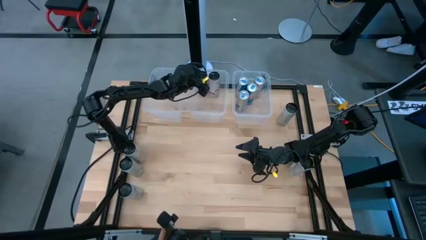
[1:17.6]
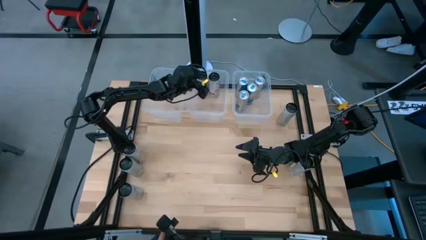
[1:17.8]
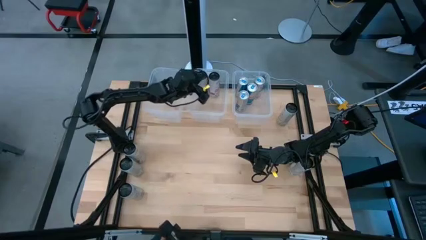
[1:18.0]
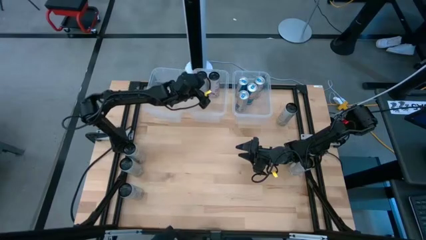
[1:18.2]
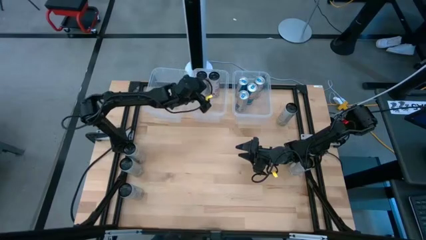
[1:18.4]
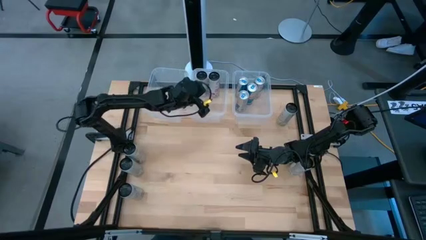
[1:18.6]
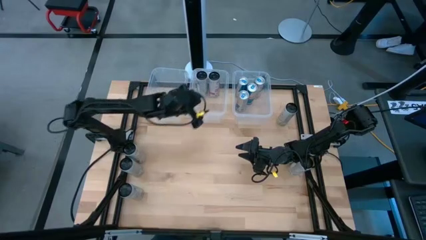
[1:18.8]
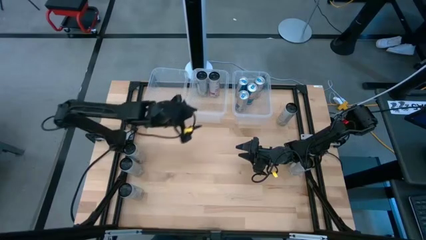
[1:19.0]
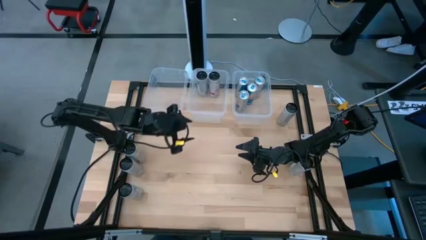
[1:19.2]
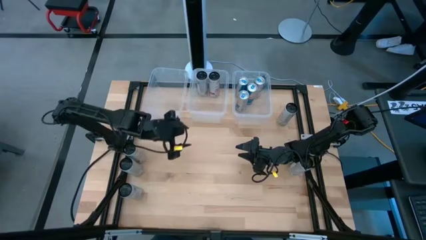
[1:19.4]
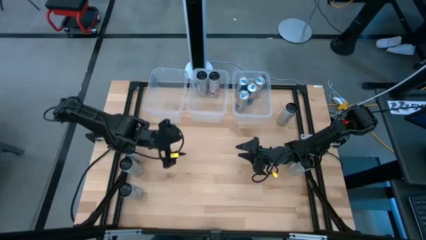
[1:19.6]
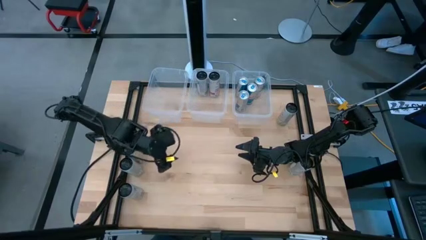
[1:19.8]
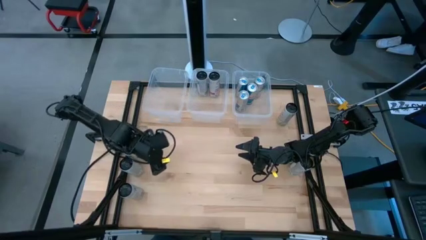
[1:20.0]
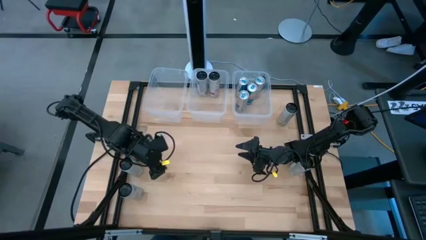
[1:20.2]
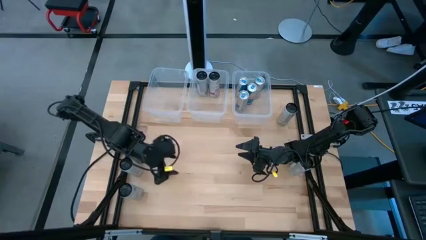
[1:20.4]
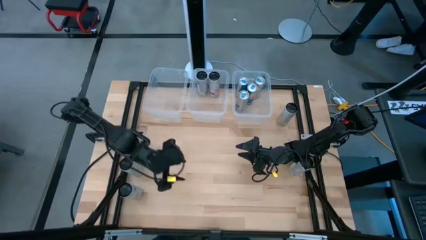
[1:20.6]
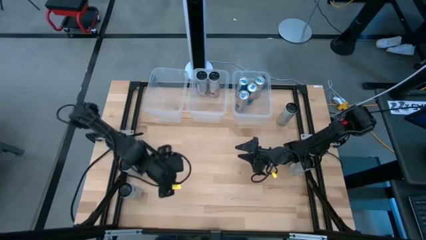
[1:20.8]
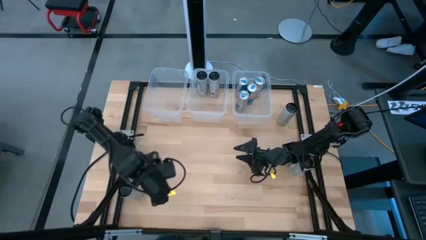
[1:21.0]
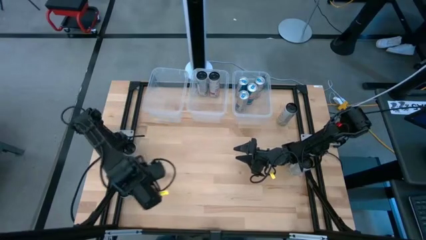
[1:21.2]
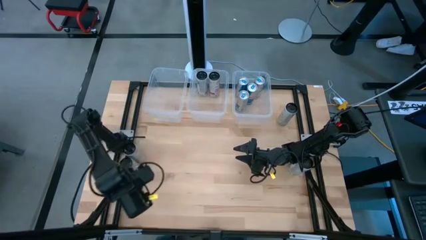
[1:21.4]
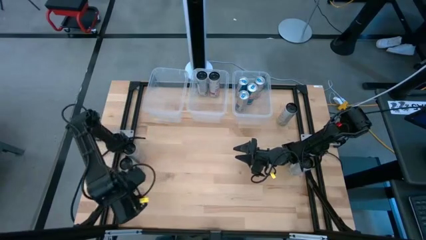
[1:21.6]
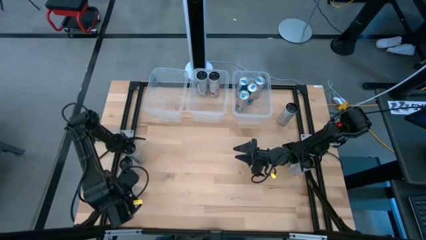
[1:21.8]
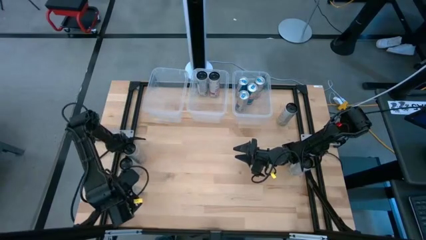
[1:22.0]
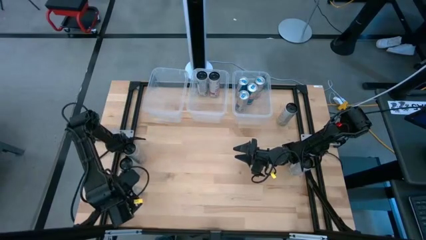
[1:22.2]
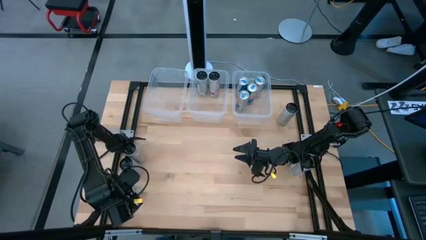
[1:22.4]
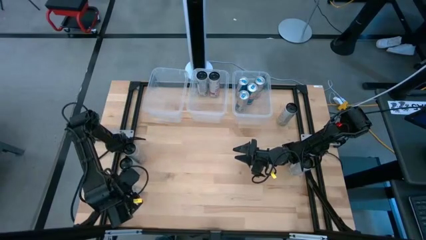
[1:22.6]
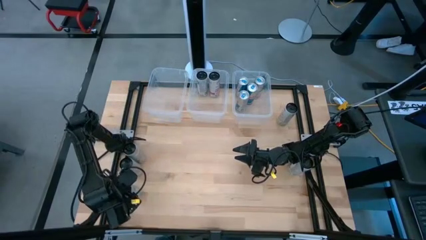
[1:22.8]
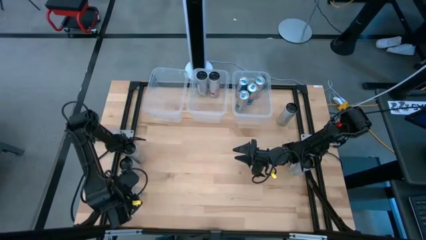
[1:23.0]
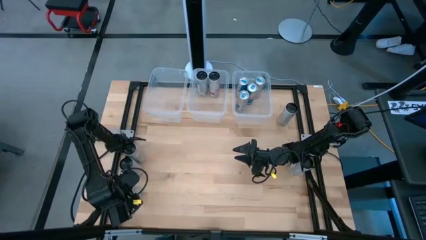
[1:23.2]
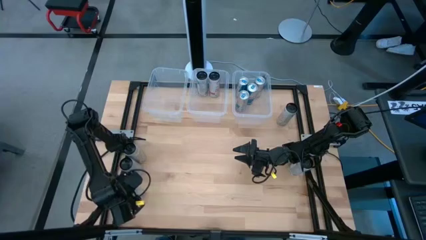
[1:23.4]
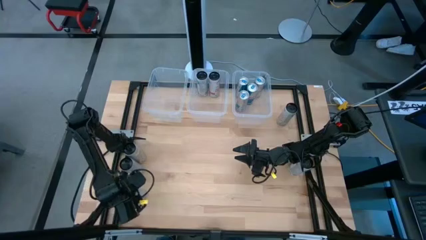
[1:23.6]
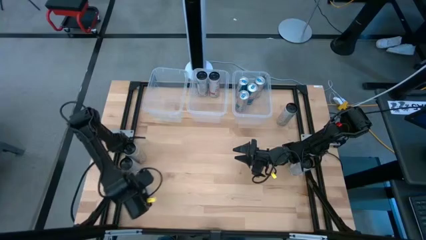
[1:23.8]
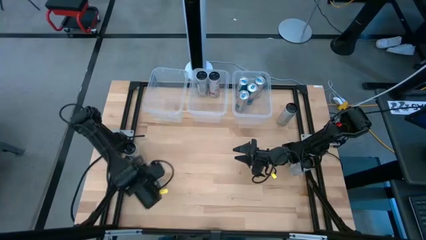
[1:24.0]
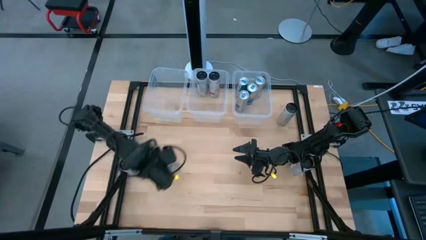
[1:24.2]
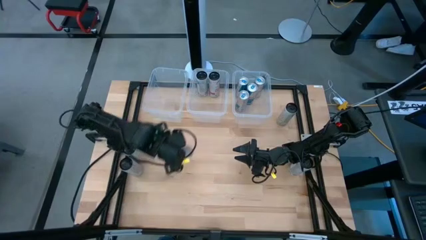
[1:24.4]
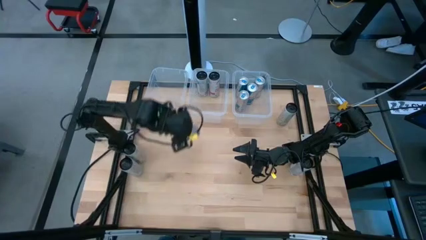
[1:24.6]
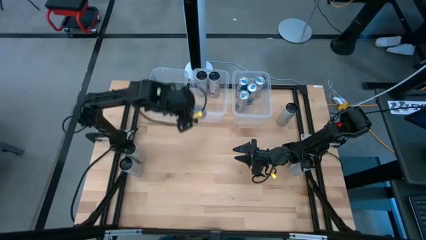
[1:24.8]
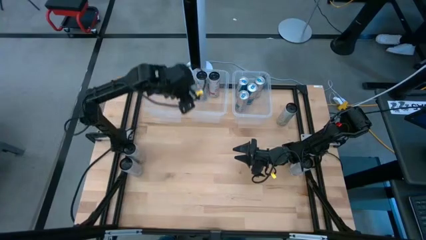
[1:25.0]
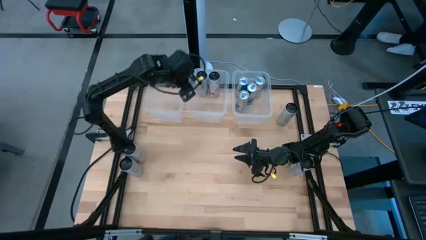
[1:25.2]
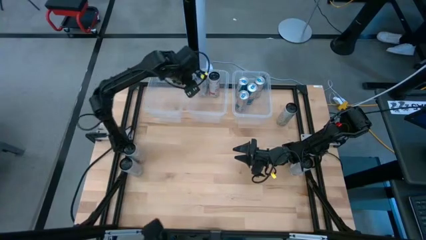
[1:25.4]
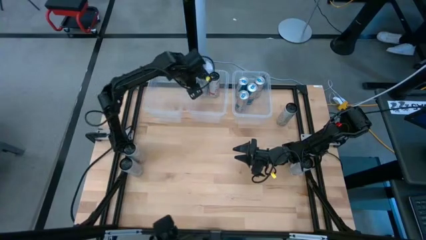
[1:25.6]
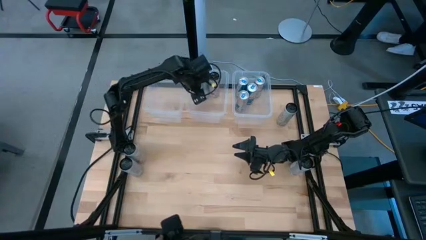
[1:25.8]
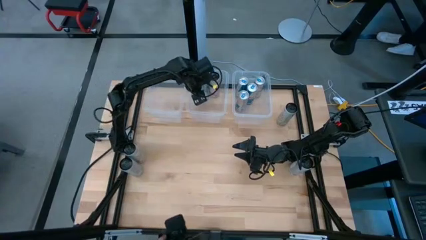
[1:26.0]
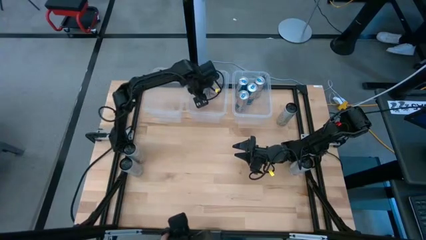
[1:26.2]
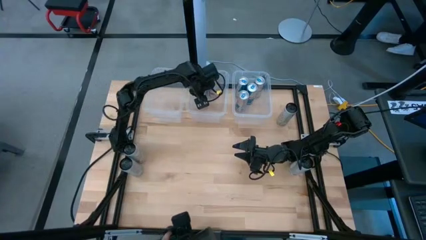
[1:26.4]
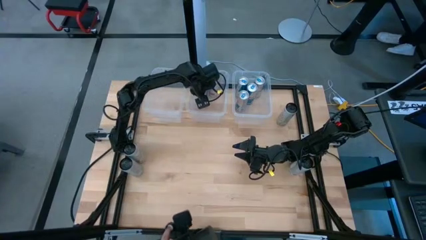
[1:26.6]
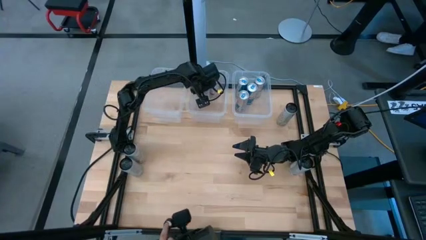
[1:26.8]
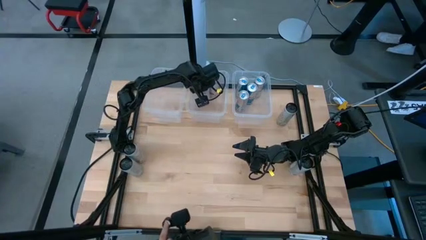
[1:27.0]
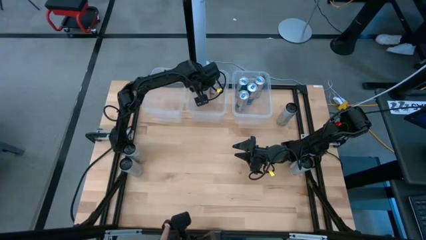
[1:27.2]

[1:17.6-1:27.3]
Task: Sort soda cans
Put the white-pink soda can into the middle transparent bin

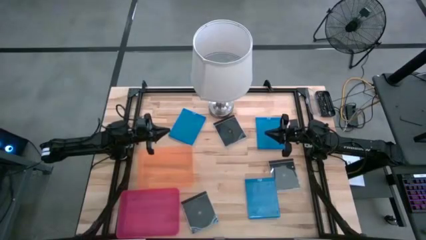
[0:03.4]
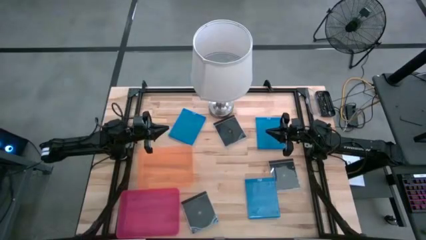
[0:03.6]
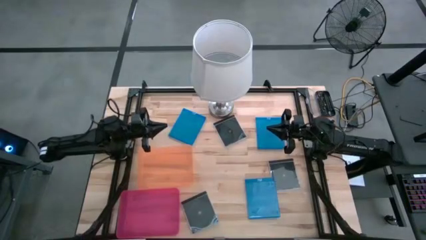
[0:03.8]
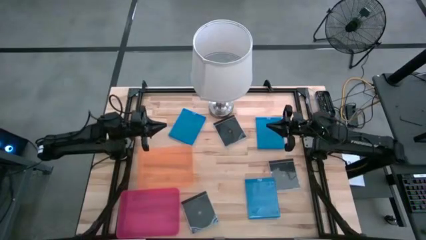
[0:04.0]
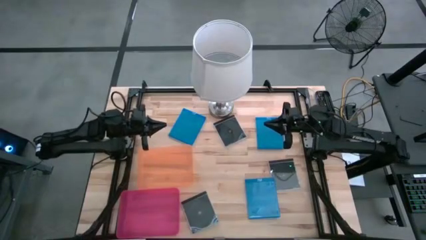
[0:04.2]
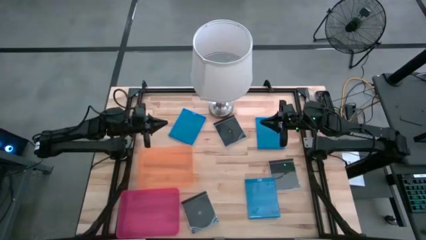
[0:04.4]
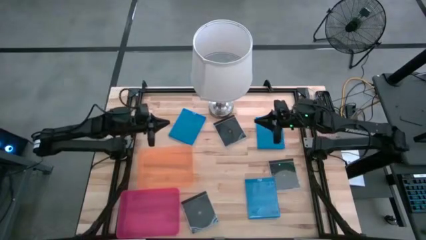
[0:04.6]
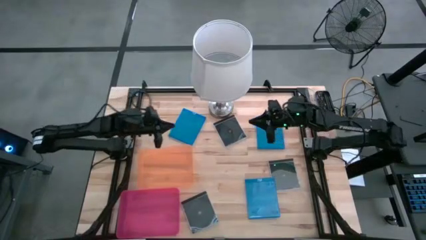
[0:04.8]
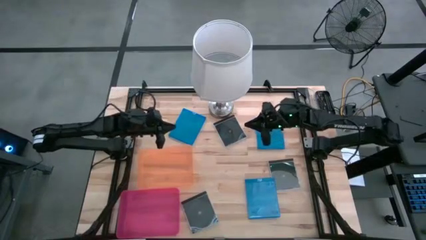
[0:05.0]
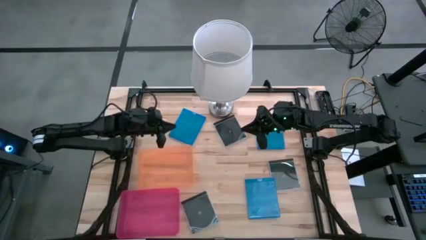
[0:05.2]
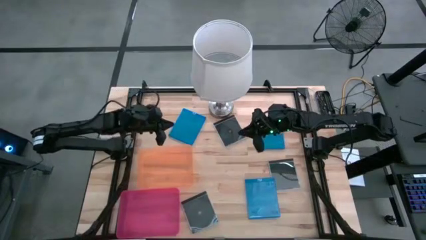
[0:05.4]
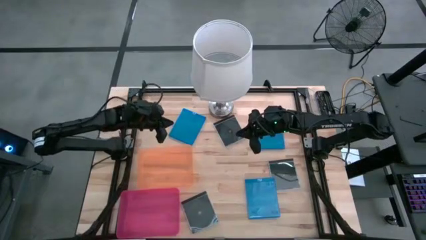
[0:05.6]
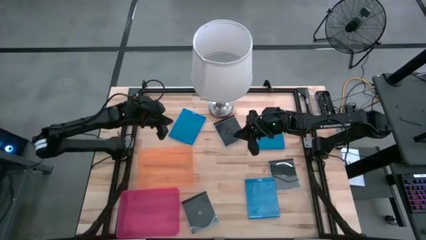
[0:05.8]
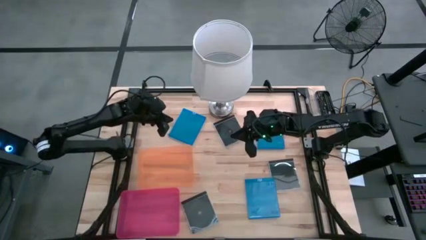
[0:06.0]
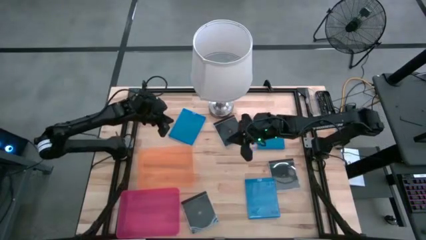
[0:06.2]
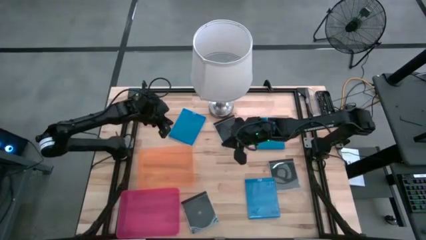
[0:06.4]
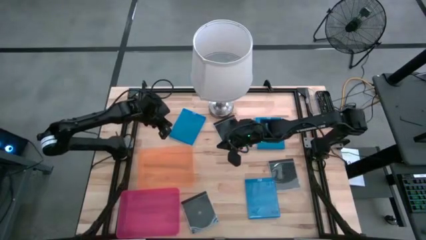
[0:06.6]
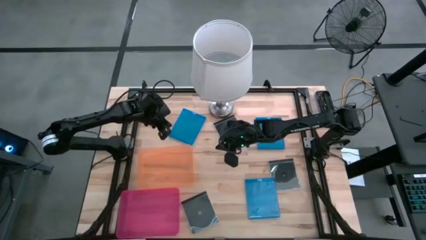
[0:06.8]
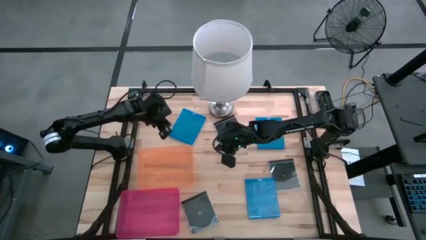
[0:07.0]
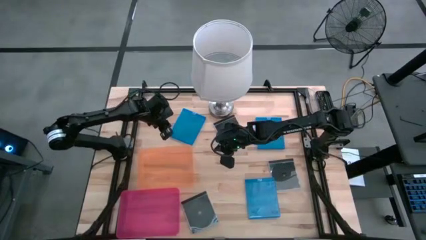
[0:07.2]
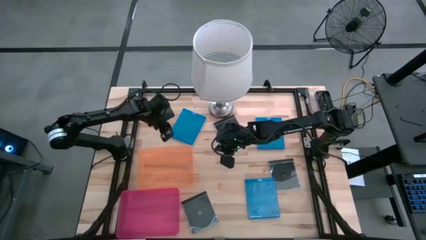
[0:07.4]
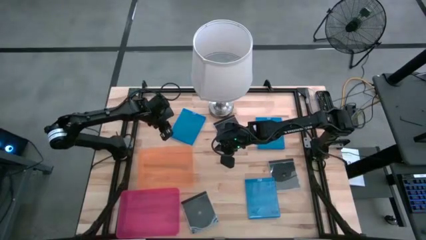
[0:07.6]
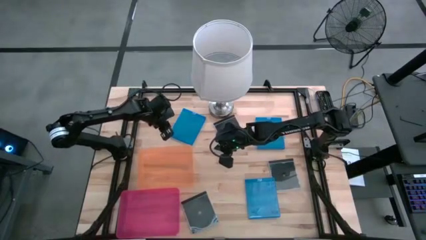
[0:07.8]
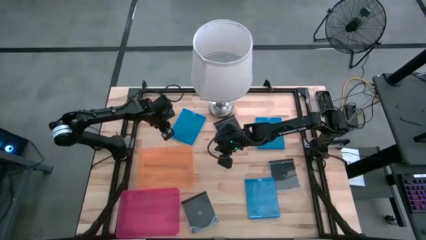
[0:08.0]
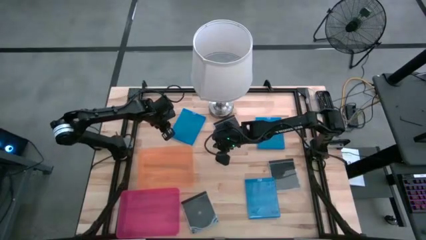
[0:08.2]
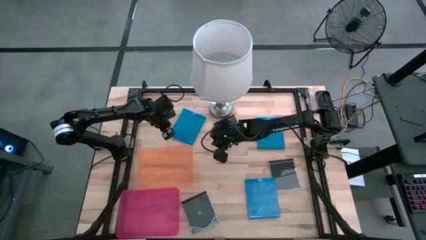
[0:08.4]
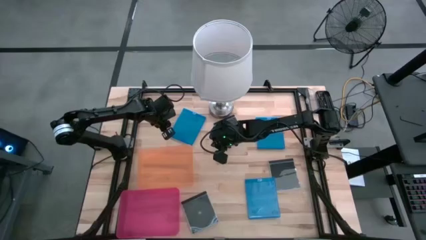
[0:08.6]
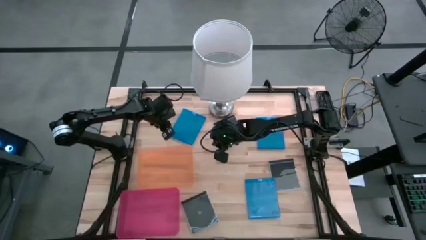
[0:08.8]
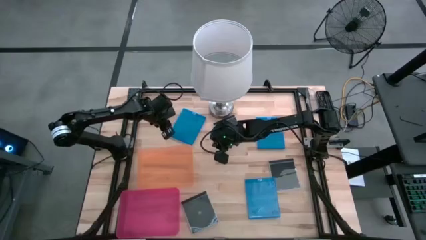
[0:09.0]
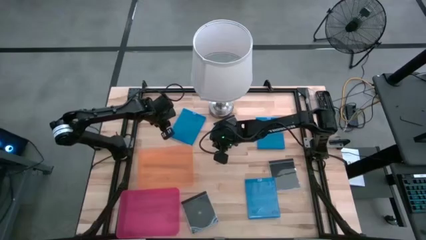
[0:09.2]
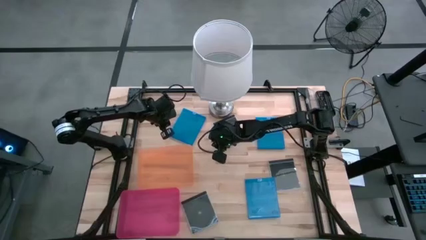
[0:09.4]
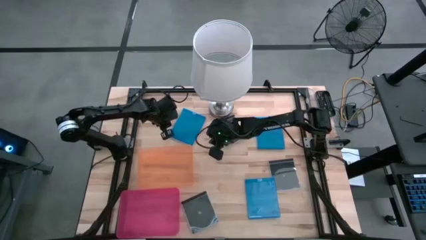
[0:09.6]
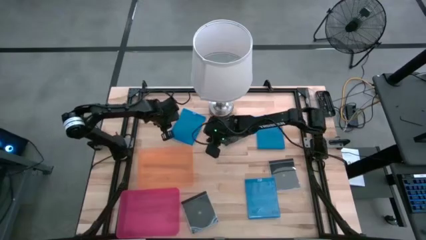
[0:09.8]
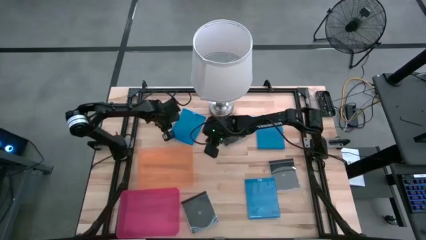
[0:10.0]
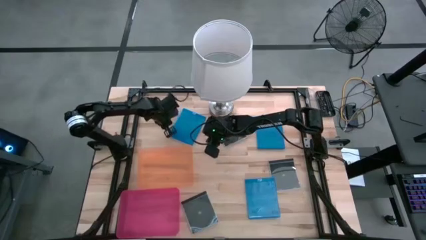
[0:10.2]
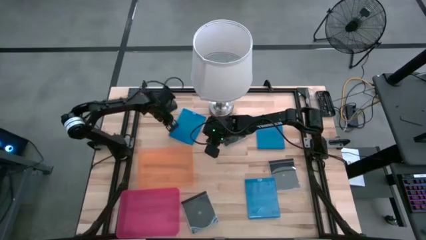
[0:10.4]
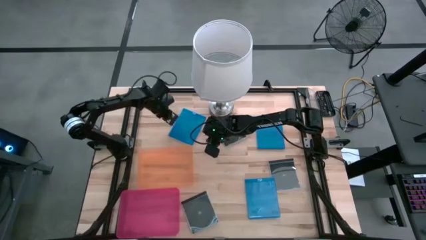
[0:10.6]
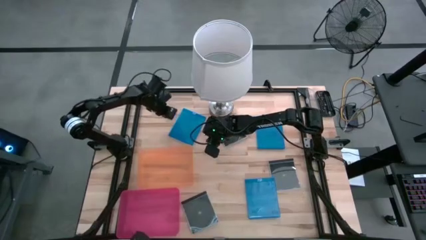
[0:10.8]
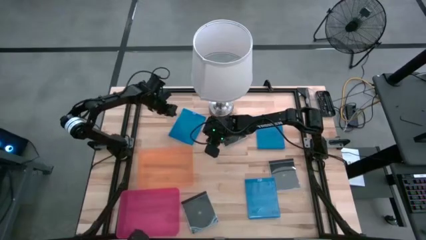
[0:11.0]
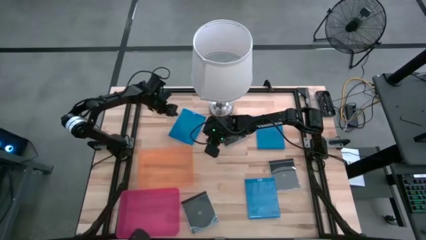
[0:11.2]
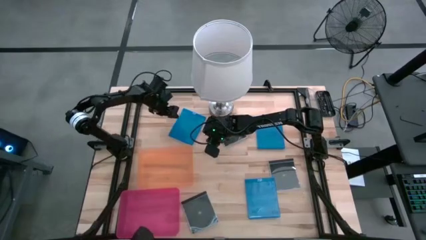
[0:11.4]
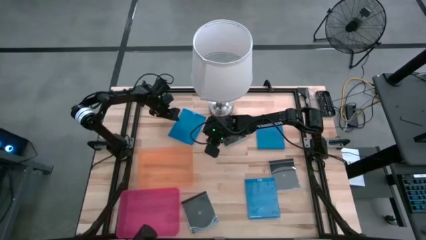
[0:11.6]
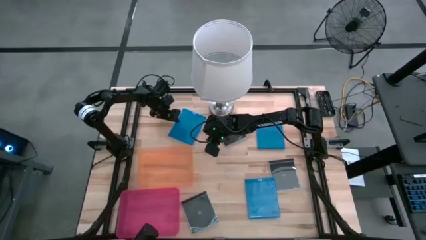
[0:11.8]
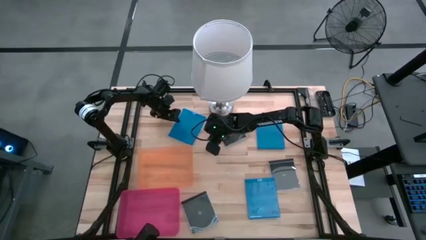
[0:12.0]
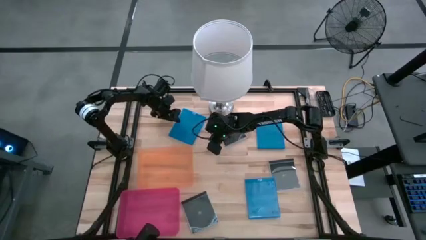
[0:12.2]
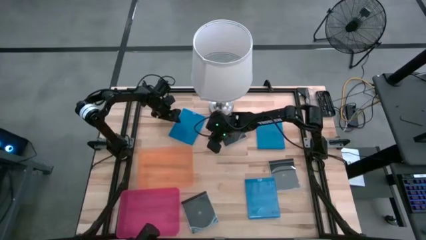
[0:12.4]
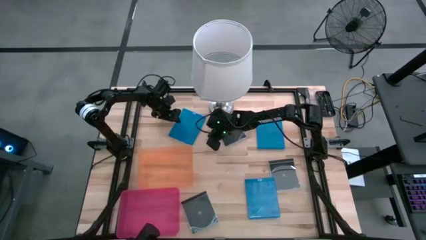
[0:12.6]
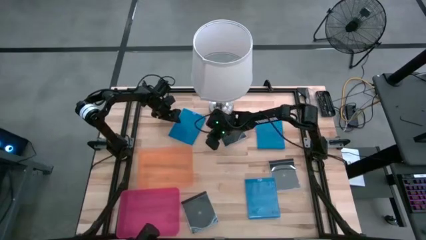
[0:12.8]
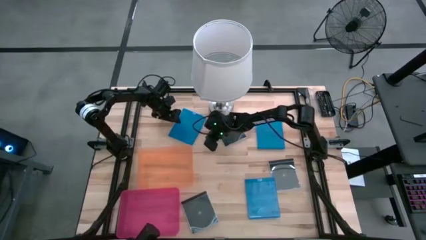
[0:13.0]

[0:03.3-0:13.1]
Task: Pick & place jewel cases by type
Put the top left blue cd case into the orange bin
